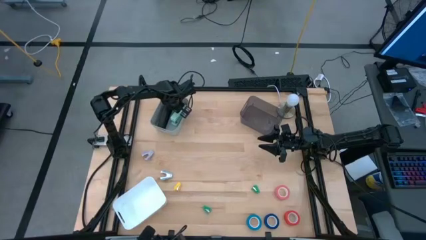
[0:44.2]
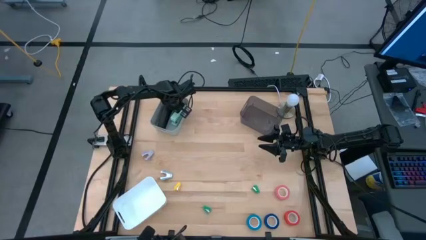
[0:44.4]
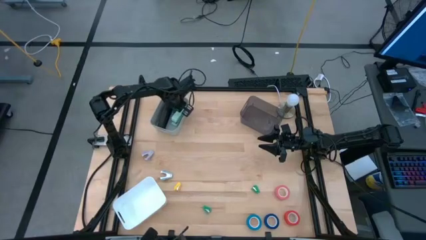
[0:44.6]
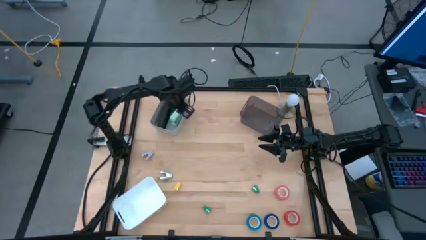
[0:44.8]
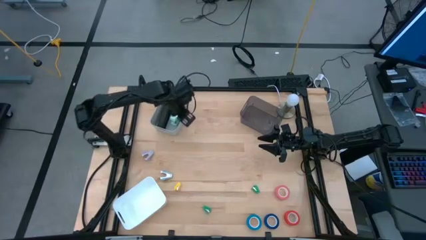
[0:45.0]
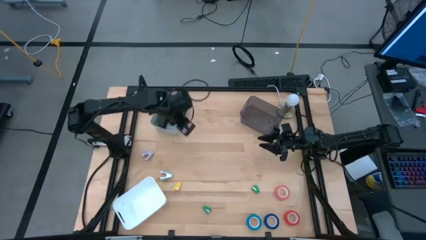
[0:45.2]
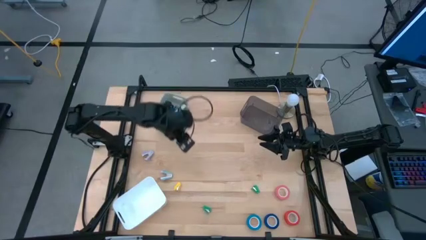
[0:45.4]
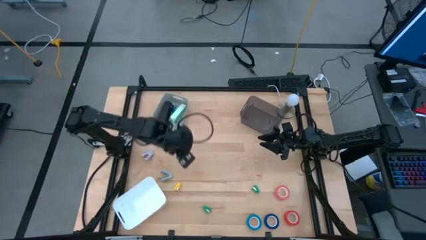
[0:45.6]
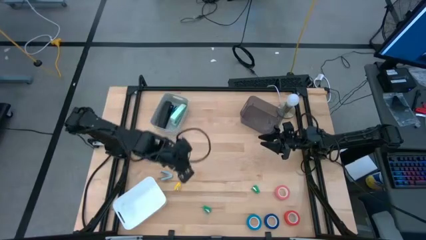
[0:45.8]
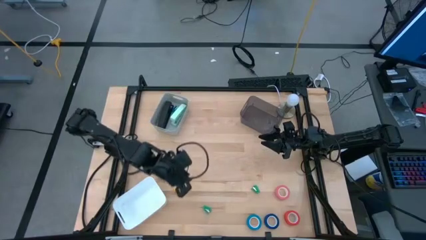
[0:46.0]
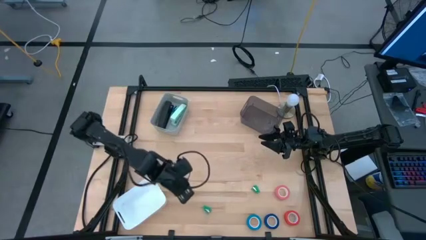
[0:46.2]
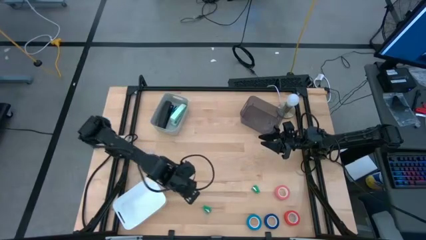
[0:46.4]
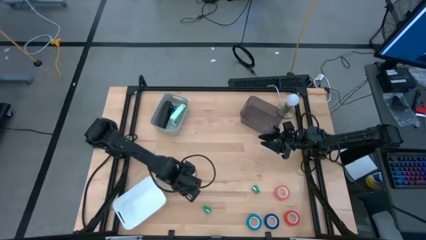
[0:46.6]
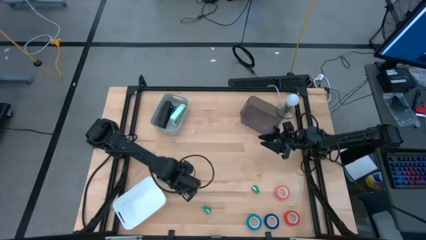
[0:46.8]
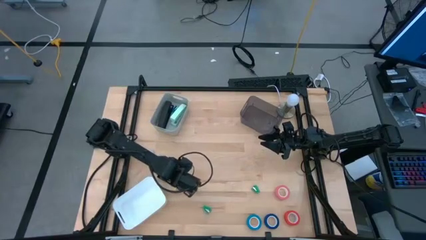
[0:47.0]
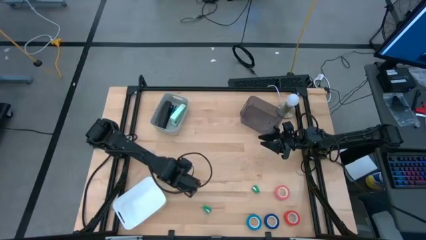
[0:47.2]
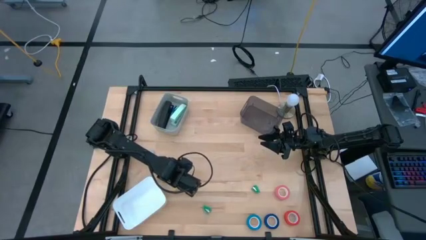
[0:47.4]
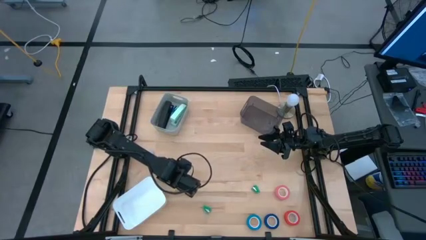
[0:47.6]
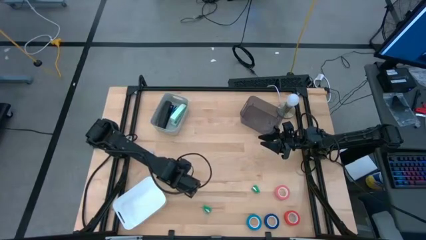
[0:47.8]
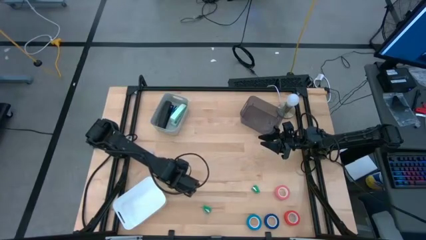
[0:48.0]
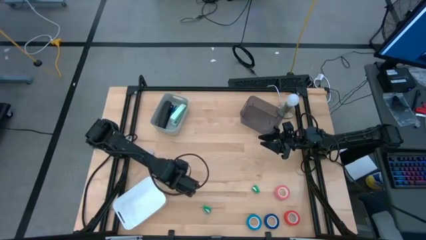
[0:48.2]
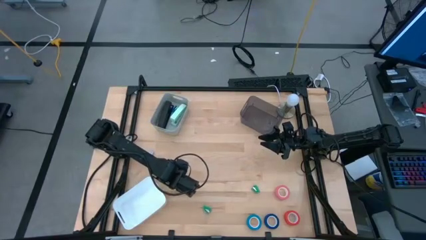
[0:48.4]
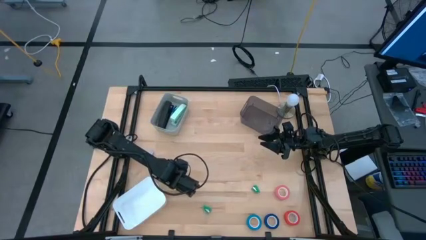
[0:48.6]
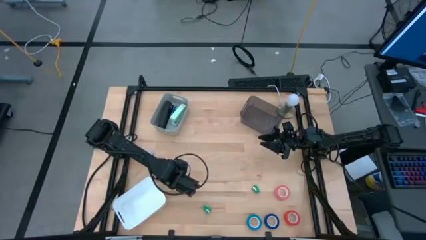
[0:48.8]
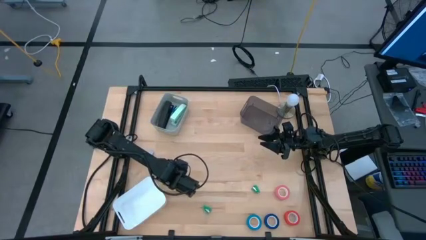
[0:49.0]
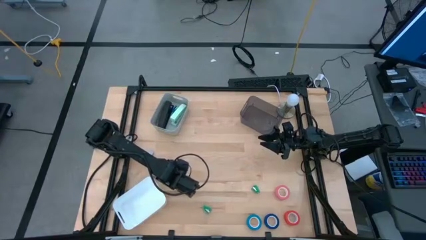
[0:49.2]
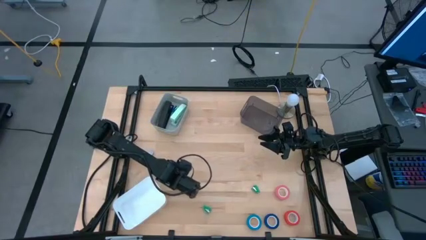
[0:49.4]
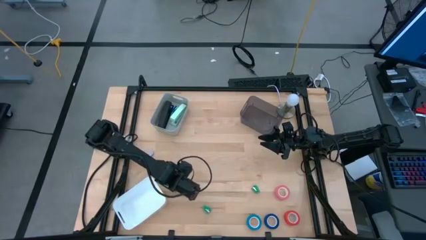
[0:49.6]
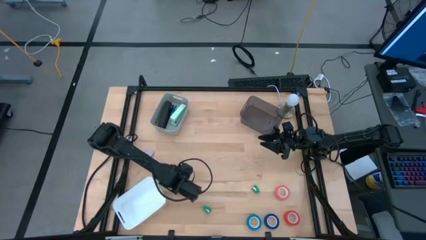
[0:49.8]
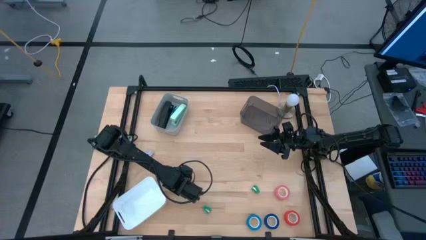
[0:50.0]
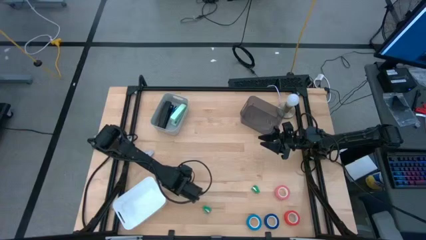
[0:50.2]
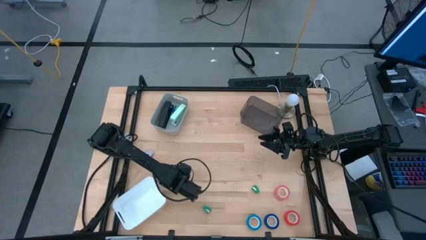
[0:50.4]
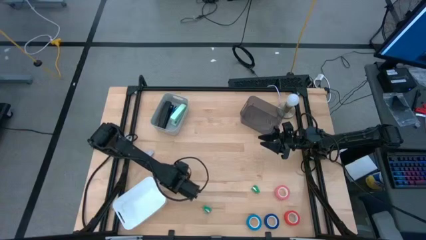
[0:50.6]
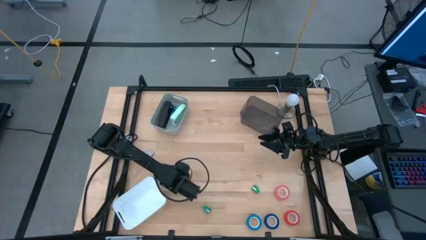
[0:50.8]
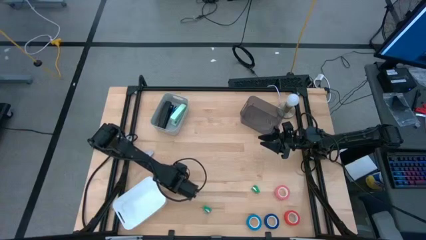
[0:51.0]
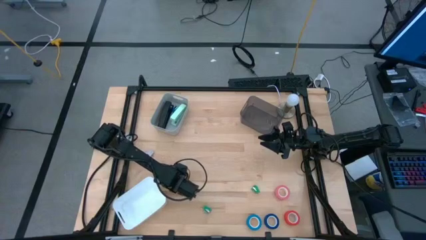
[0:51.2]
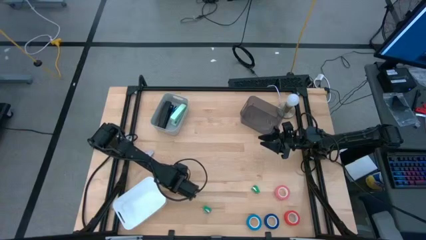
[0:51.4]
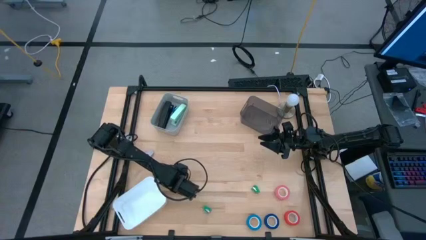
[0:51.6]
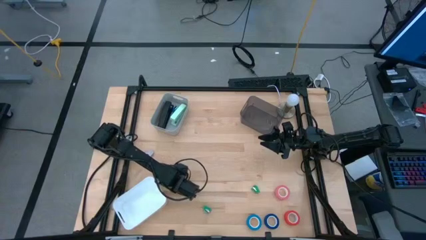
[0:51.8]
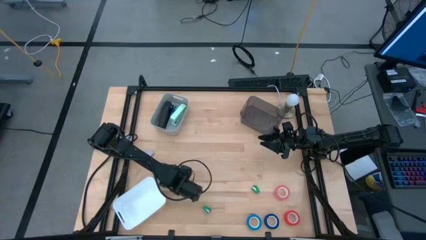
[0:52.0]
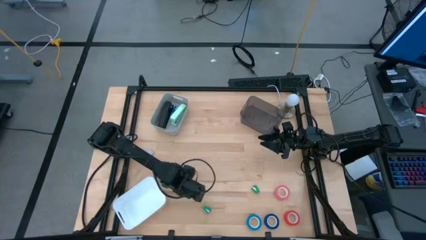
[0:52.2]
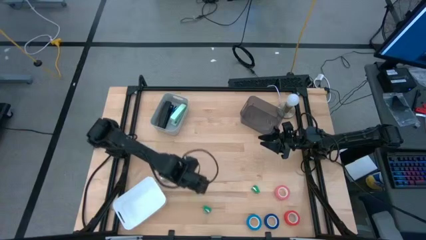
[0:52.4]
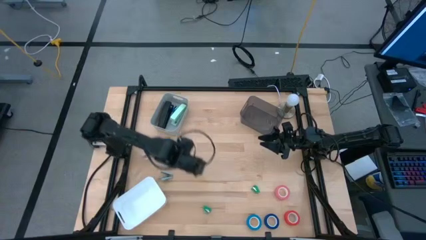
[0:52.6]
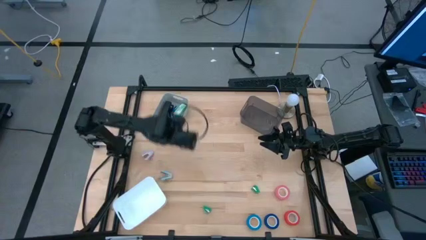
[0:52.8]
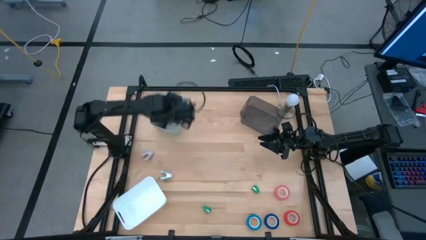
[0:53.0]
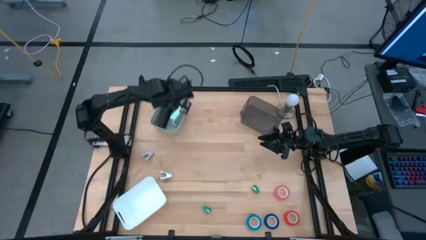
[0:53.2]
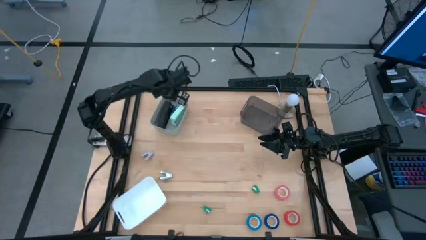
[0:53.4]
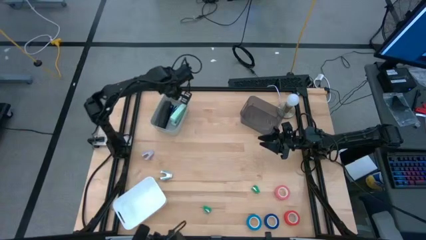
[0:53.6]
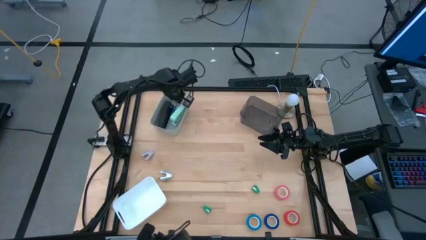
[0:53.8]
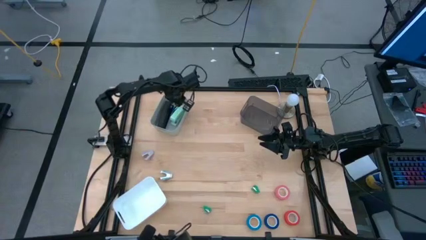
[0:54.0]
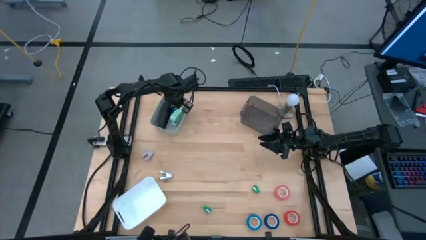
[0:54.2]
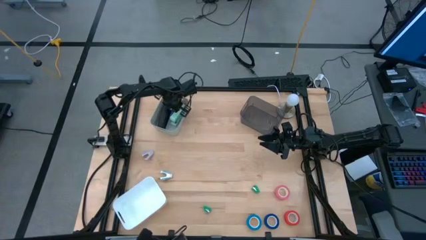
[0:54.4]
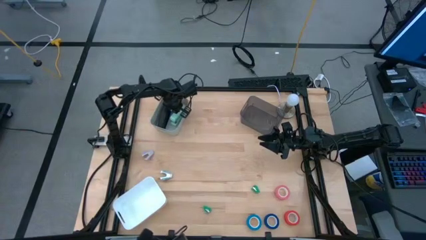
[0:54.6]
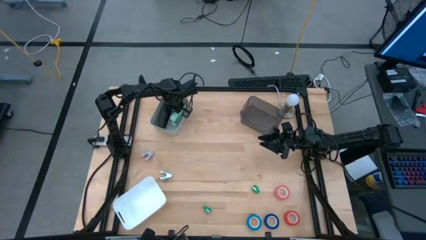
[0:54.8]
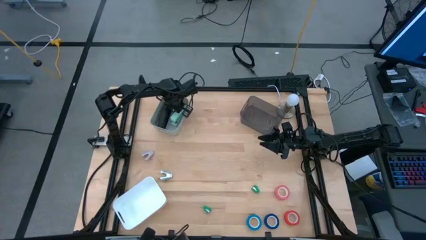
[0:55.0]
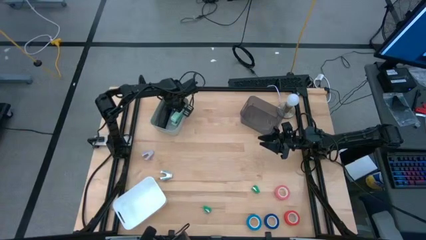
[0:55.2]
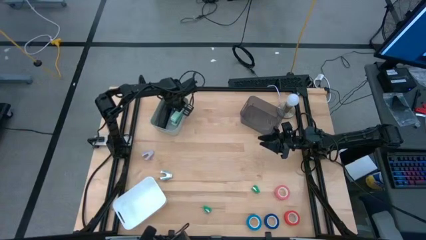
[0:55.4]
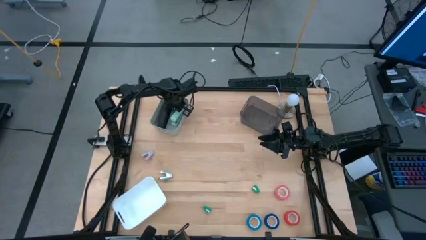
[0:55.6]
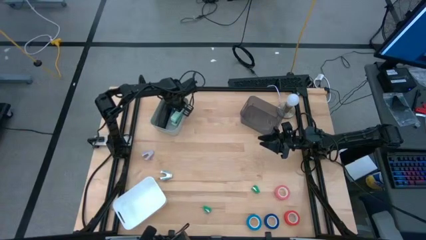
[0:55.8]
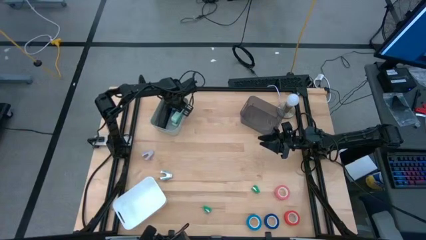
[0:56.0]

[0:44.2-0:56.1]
Task: Pick and place Stapler, Stapler remover, tape
Put the small yellow stapler into the gray bin
